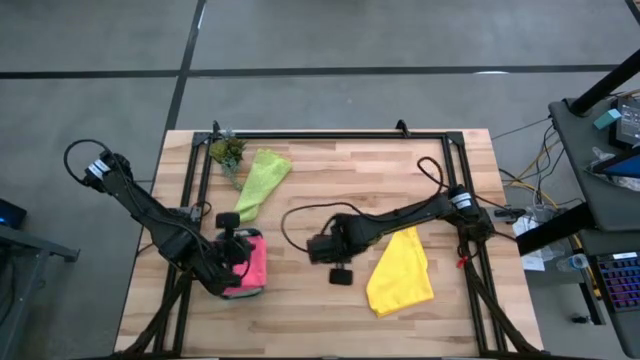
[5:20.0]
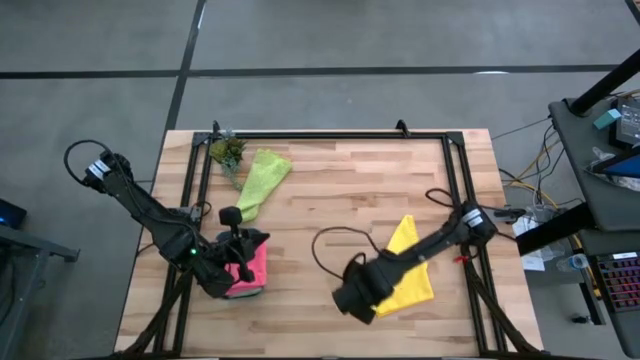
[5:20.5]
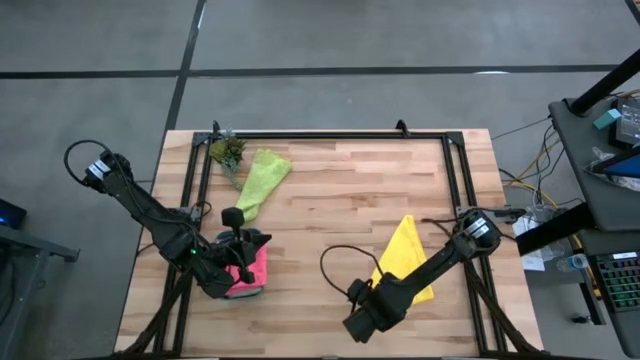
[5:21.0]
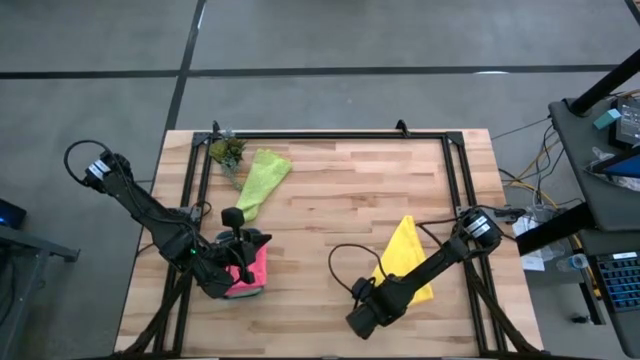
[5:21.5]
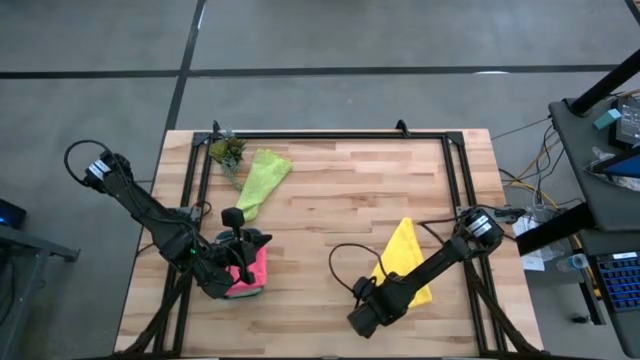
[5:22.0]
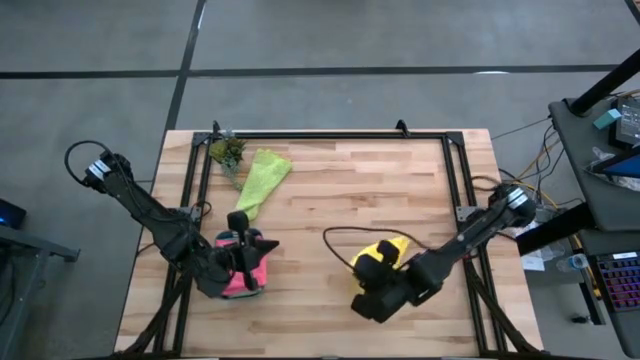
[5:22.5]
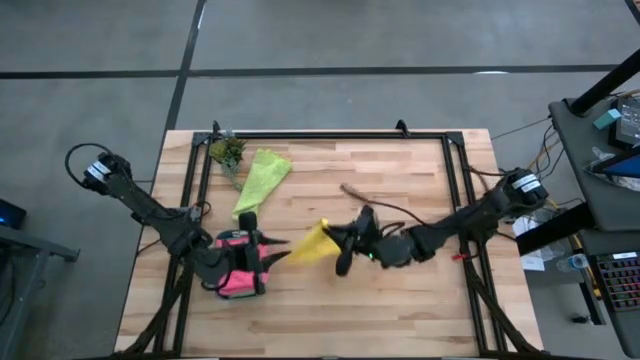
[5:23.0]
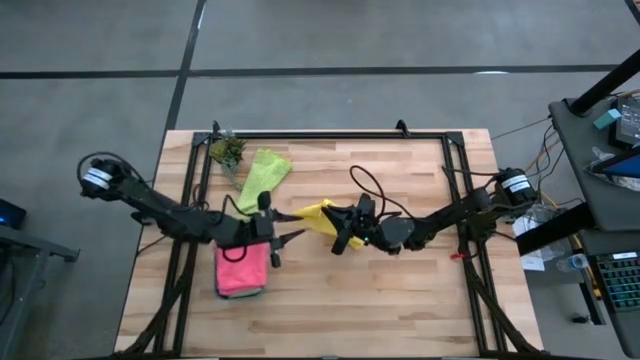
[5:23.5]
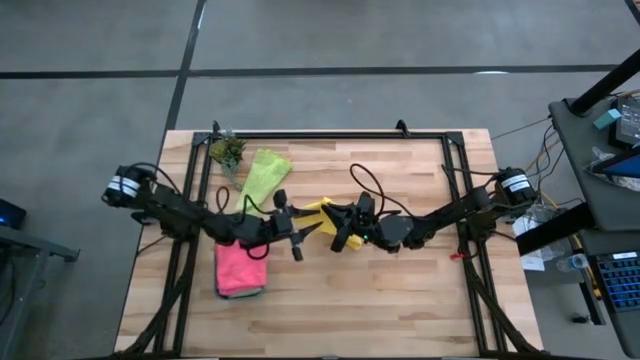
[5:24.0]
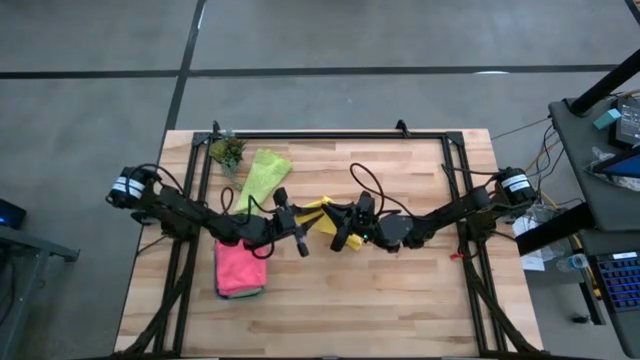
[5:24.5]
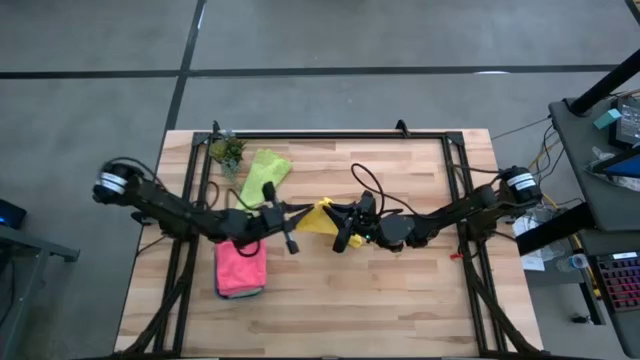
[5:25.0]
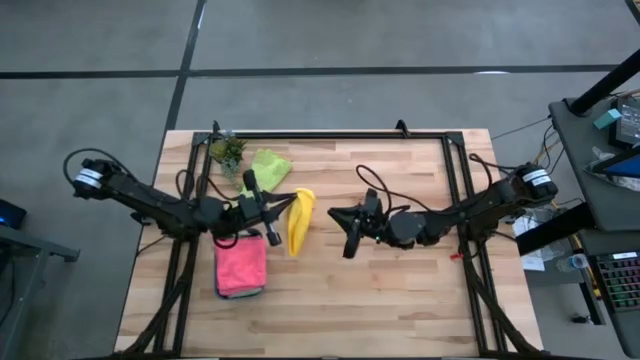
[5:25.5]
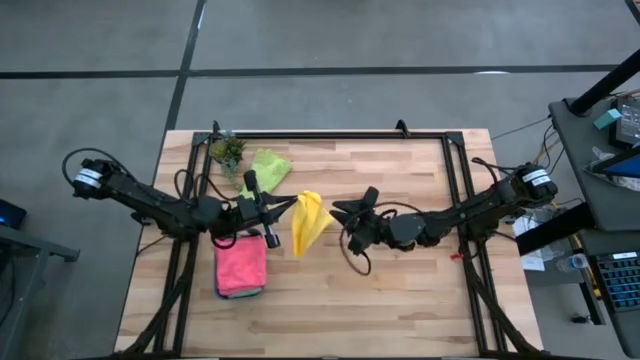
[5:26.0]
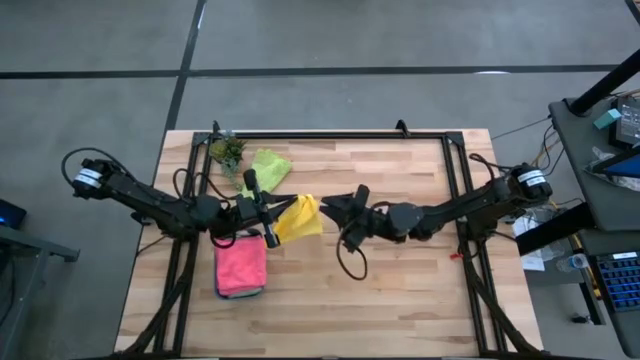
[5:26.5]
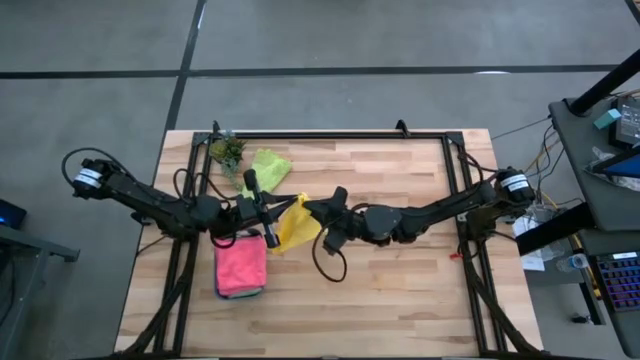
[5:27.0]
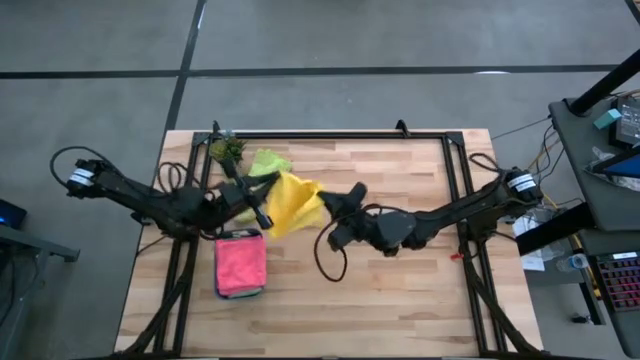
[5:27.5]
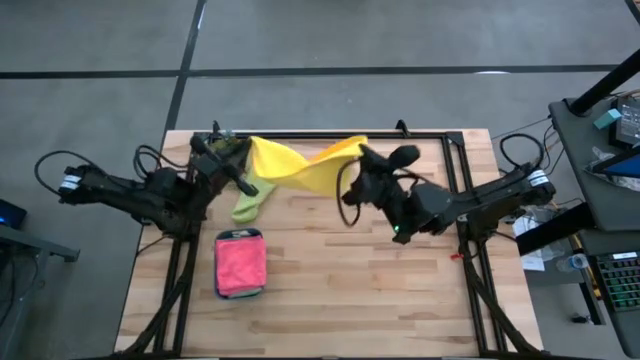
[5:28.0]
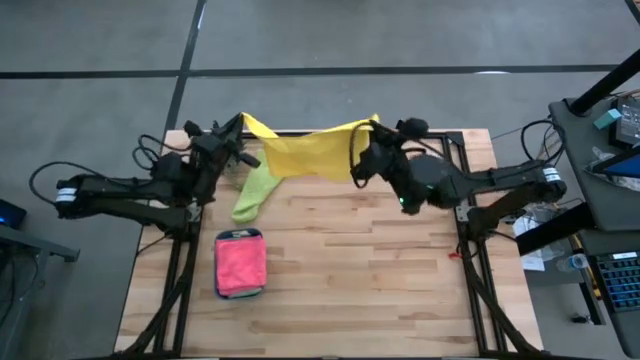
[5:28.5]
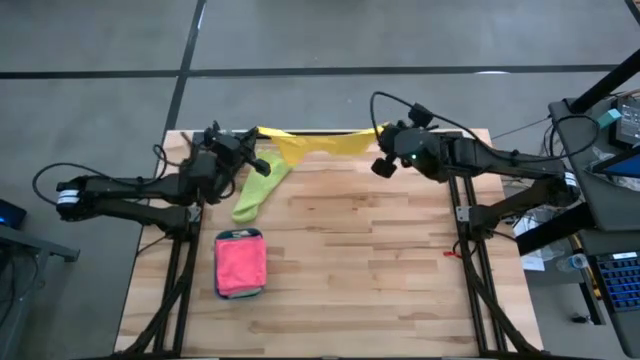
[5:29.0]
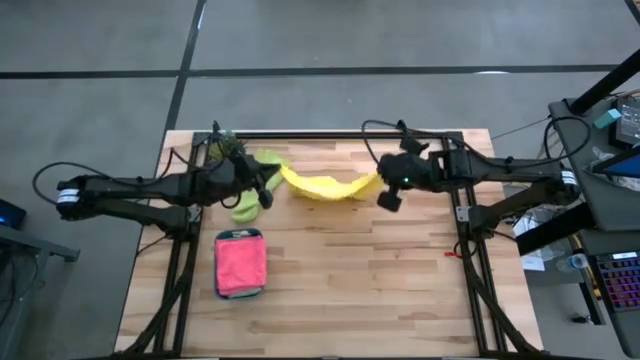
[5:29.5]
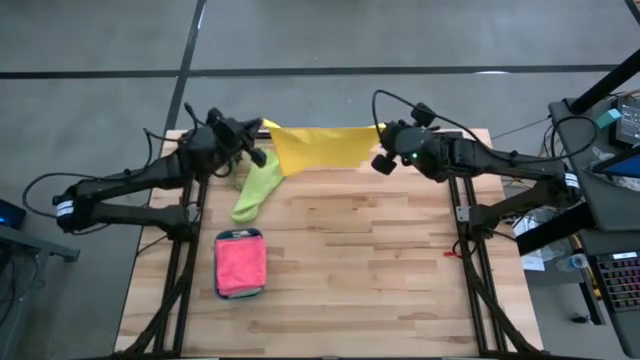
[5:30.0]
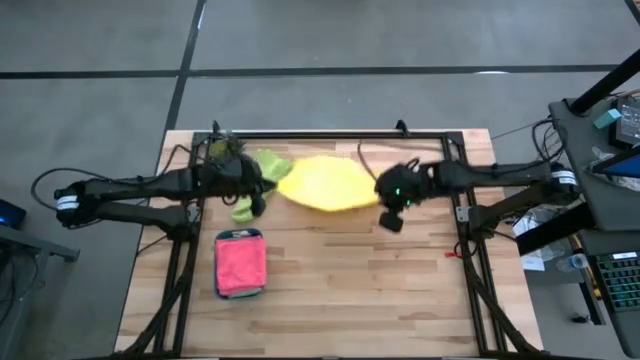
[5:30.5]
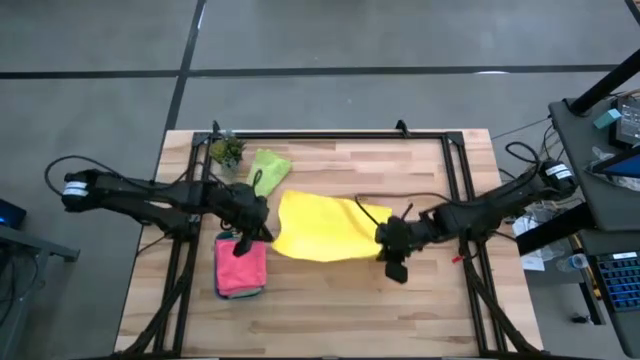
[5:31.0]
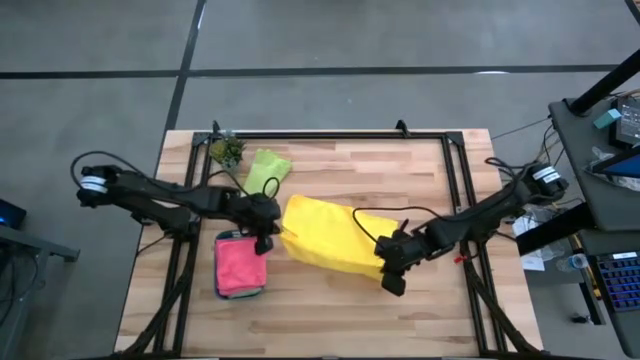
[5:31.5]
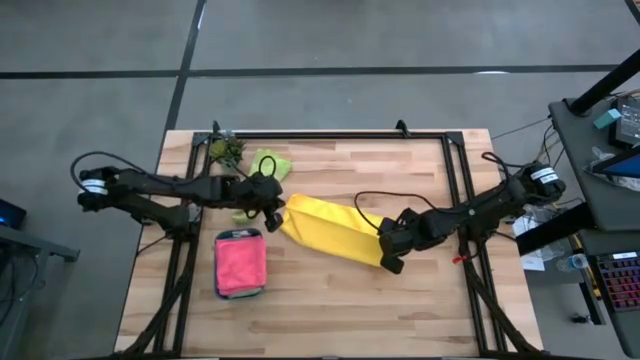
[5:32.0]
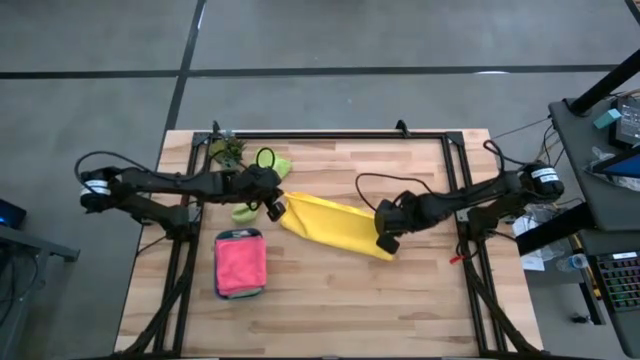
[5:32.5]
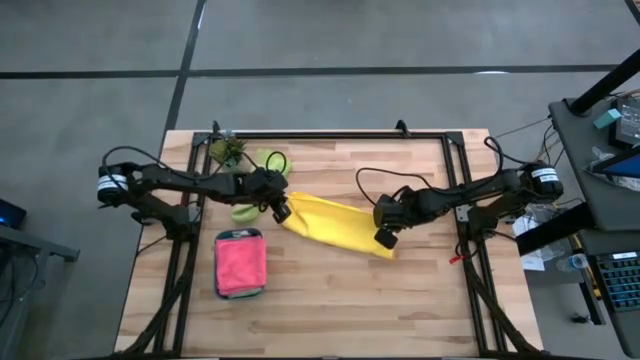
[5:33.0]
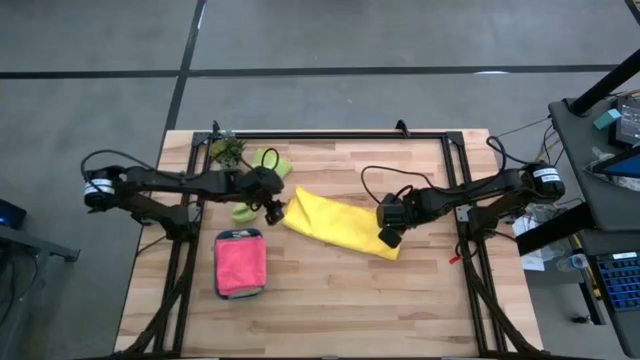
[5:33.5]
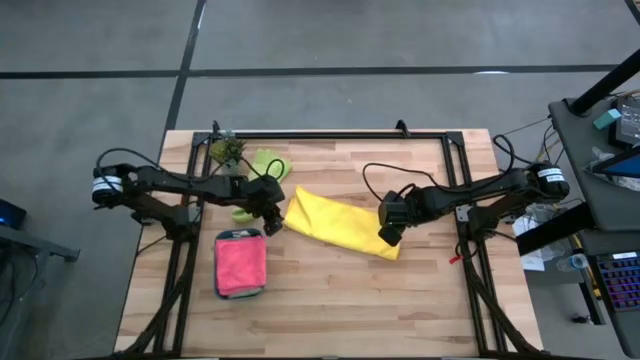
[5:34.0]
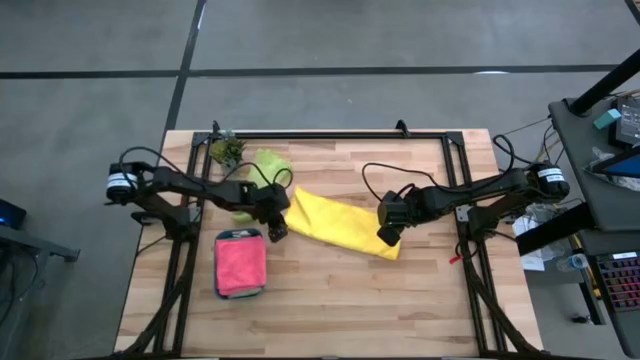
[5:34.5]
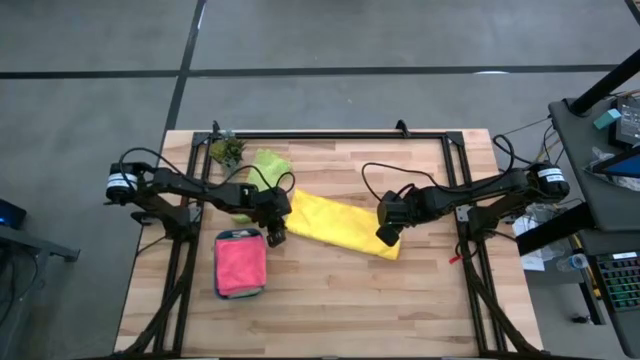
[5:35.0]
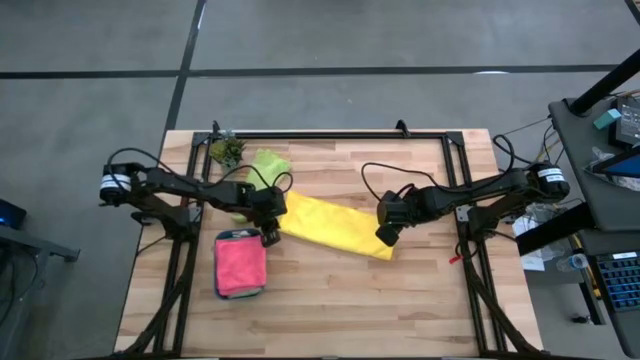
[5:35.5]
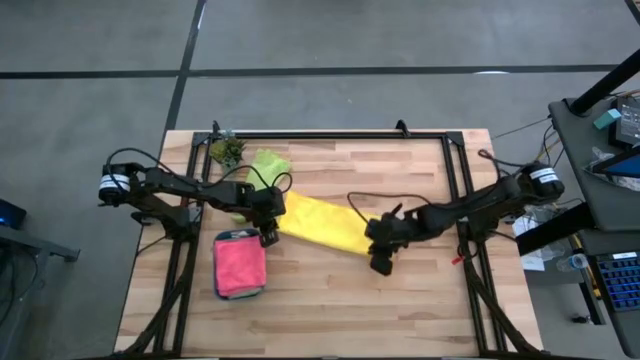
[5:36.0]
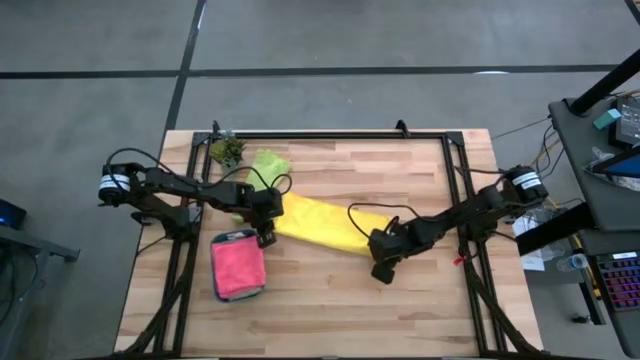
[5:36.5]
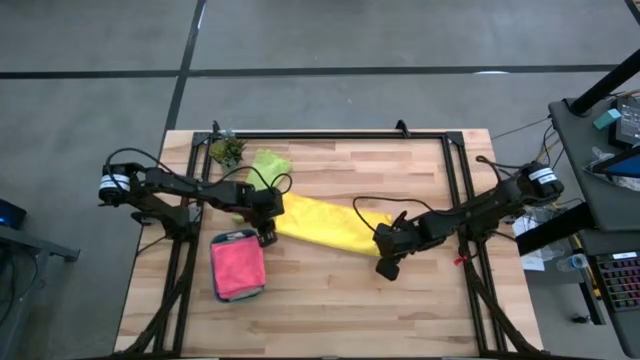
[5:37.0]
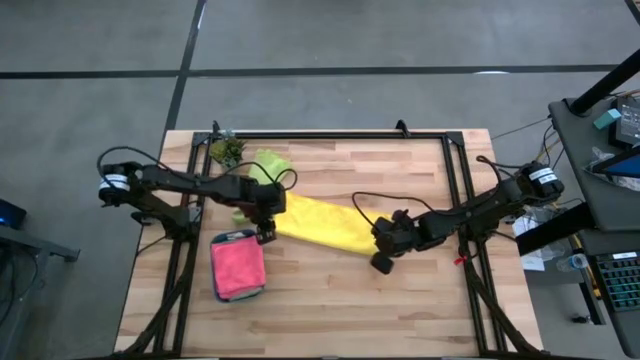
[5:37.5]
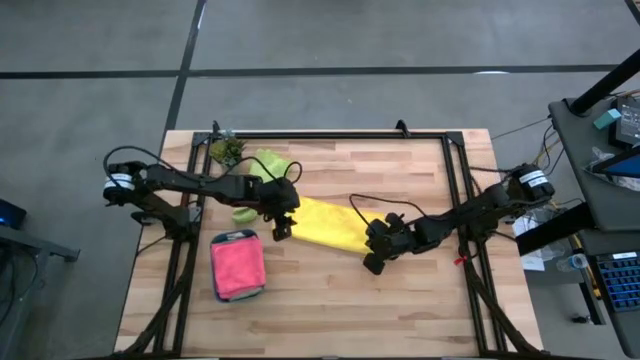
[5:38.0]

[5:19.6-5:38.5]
Task: Fold microfiber towels
Fold the yellow microfiber cloth

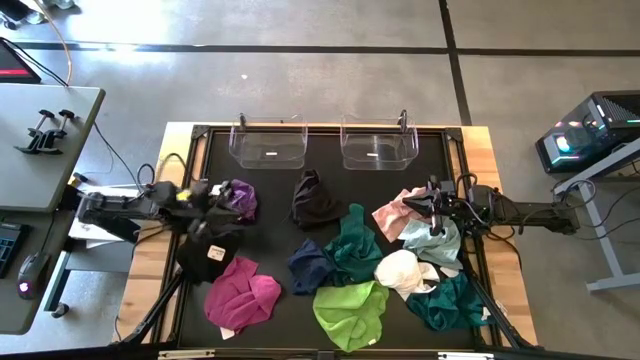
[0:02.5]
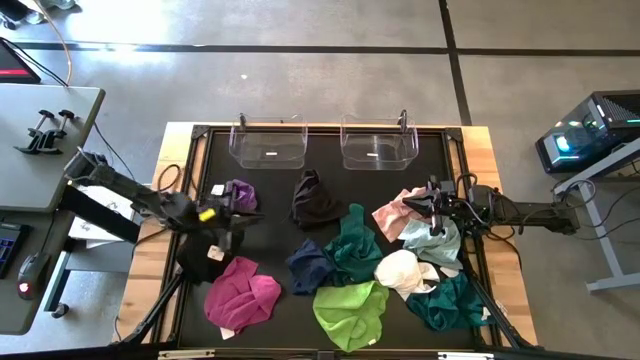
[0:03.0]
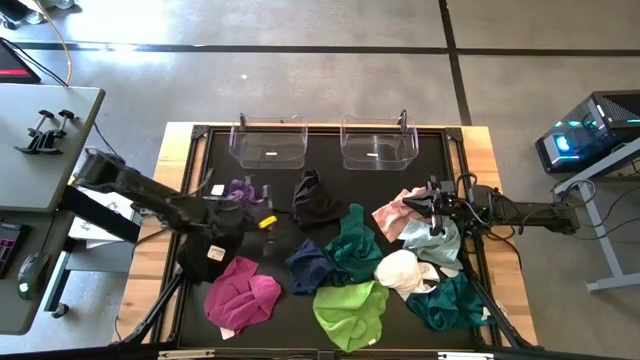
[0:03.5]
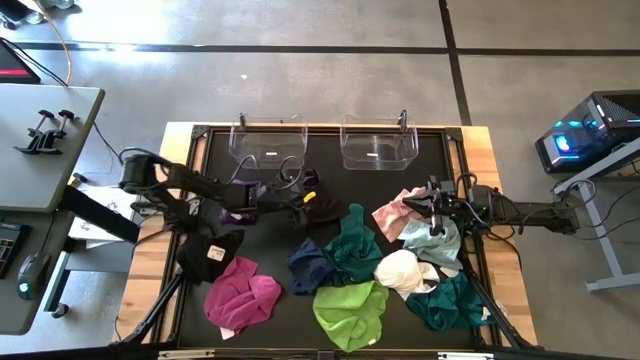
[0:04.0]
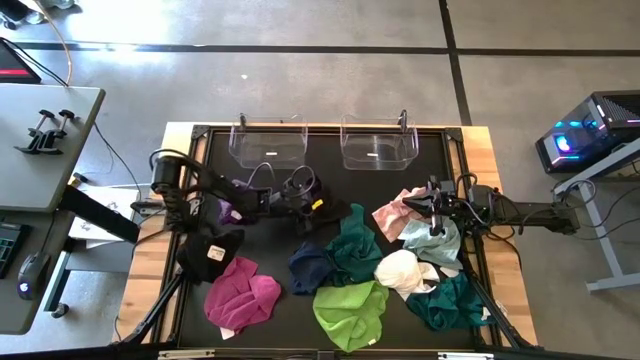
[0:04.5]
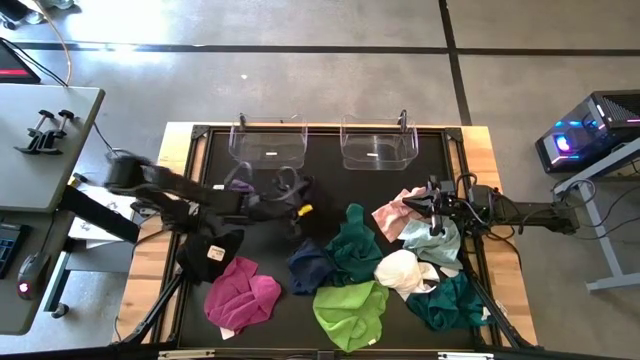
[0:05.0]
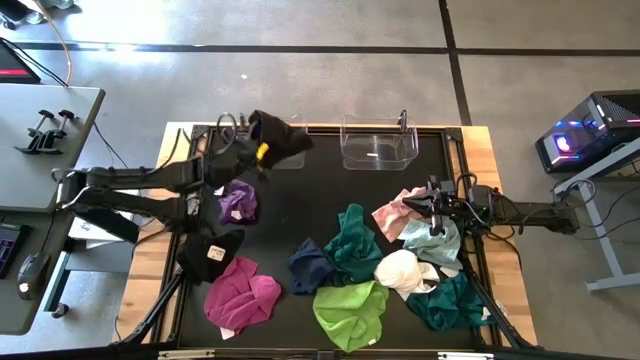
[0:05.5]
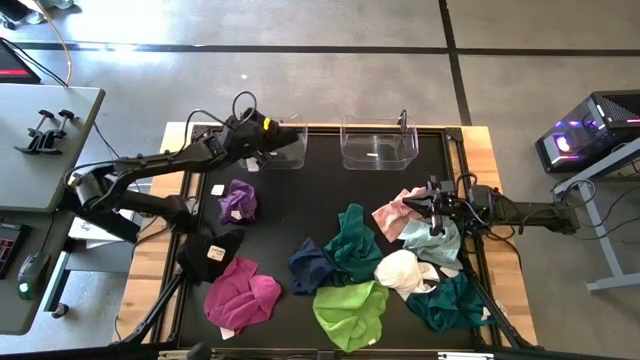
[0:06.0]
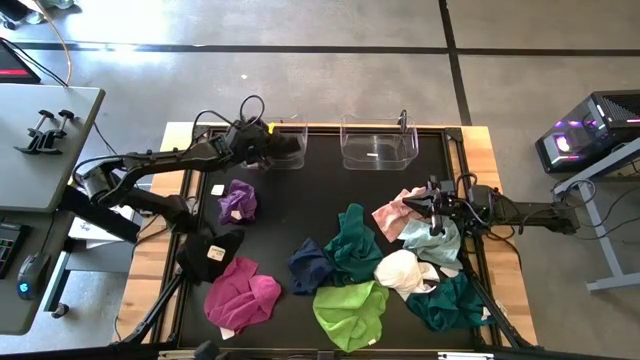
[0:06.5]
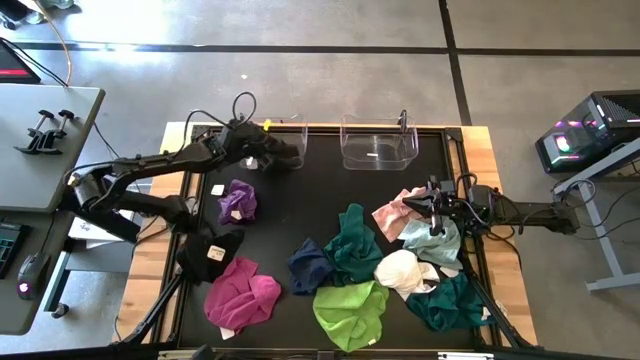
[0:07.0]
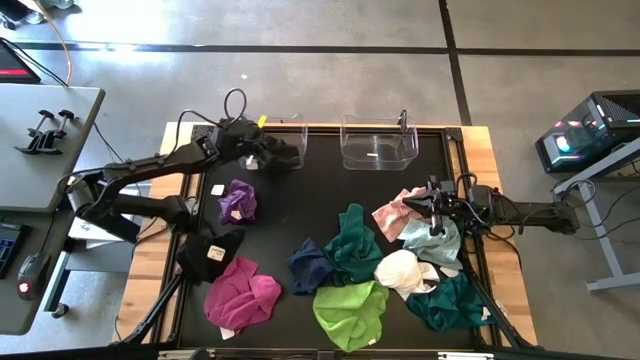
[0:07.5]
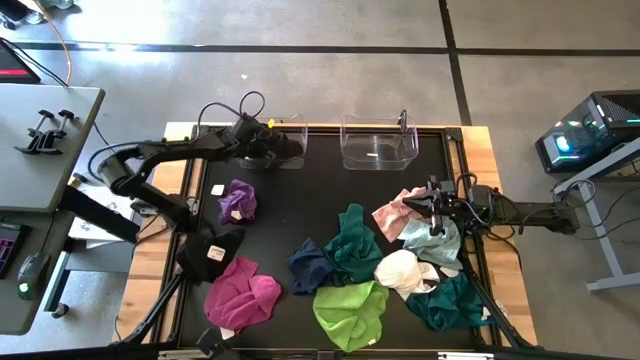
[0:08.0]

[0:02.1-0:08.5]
Task: Sort towels by color in basket
Put the top black microfiber towel into the left transparent bin
